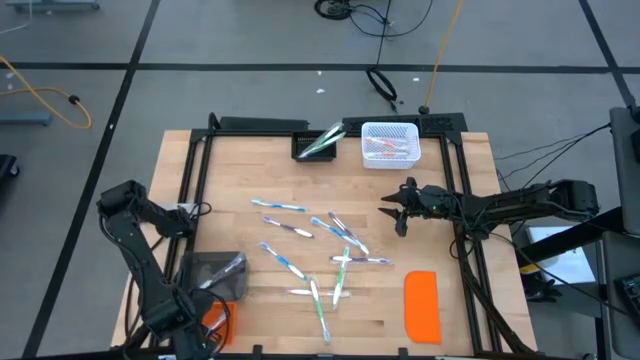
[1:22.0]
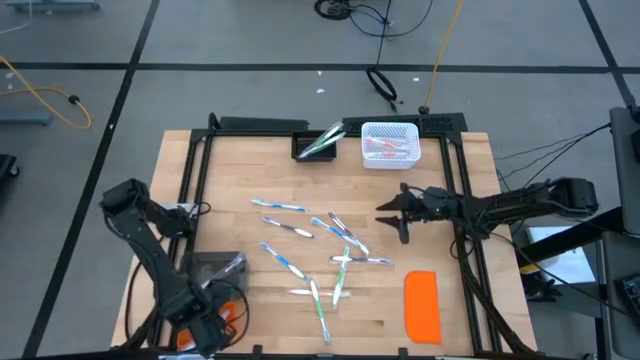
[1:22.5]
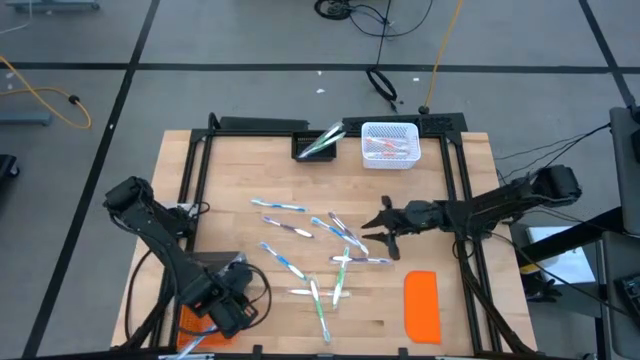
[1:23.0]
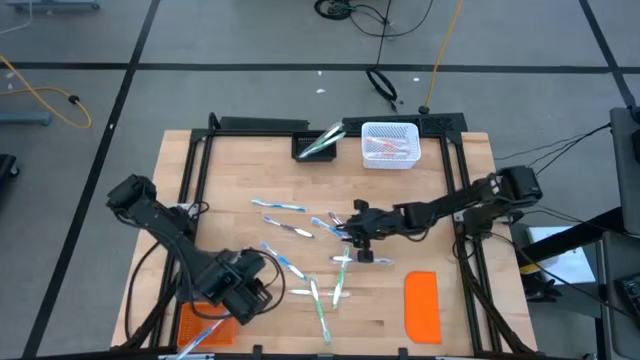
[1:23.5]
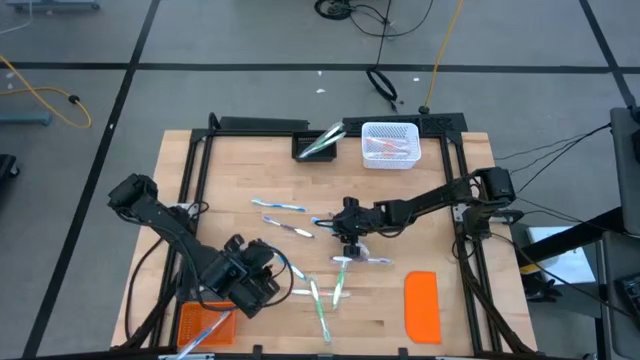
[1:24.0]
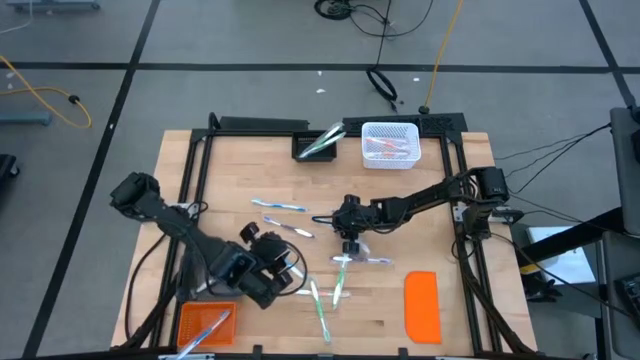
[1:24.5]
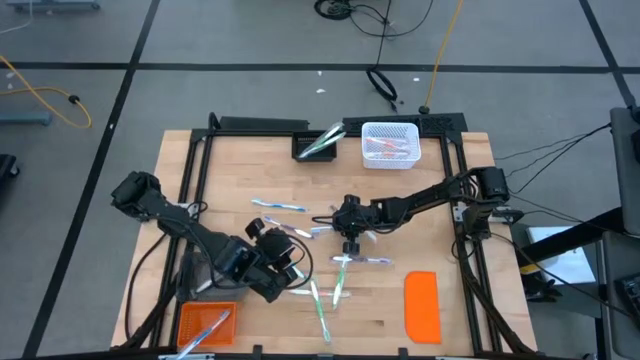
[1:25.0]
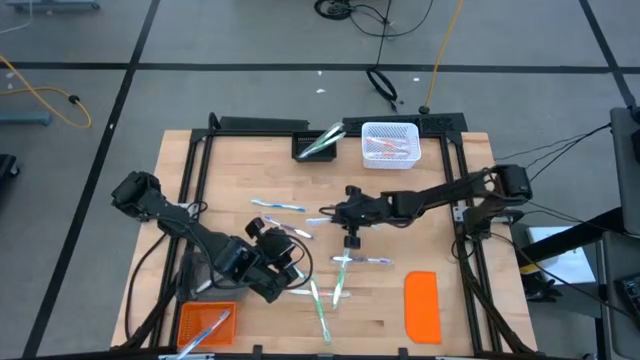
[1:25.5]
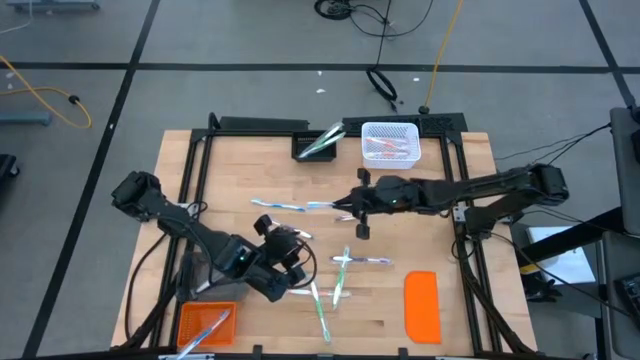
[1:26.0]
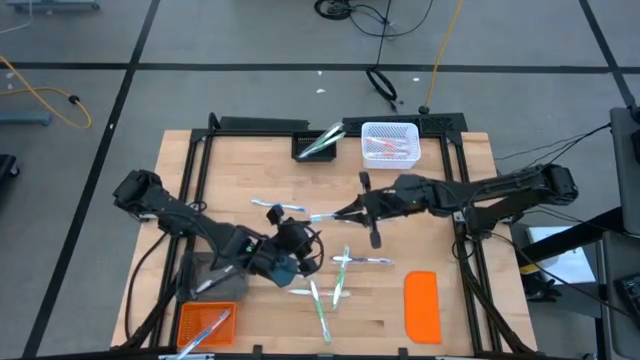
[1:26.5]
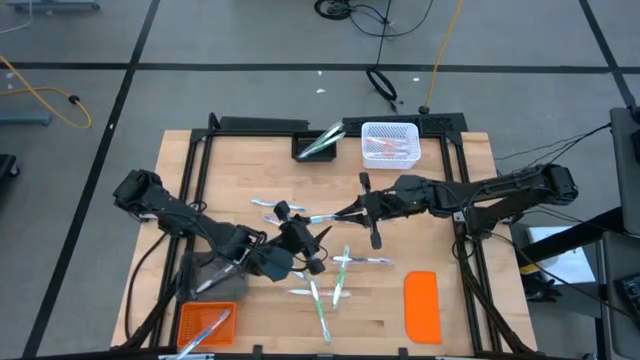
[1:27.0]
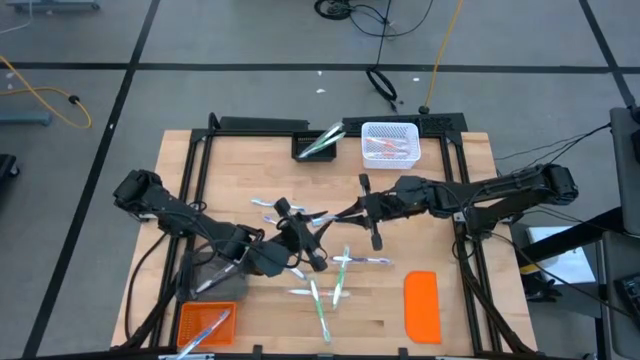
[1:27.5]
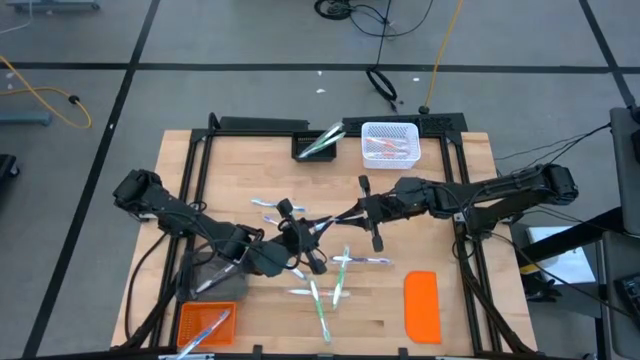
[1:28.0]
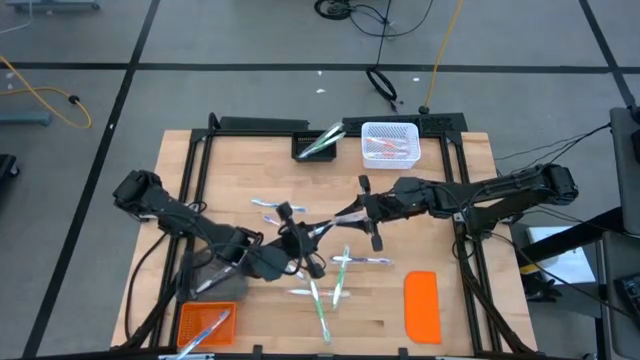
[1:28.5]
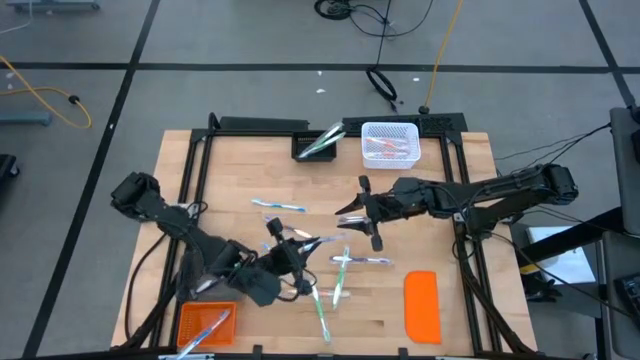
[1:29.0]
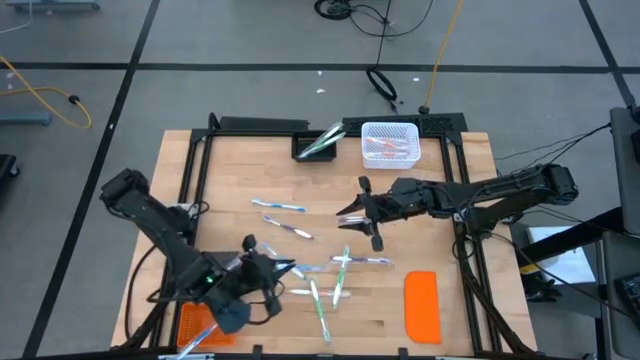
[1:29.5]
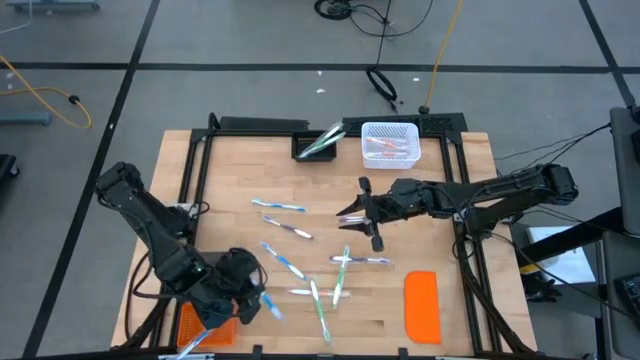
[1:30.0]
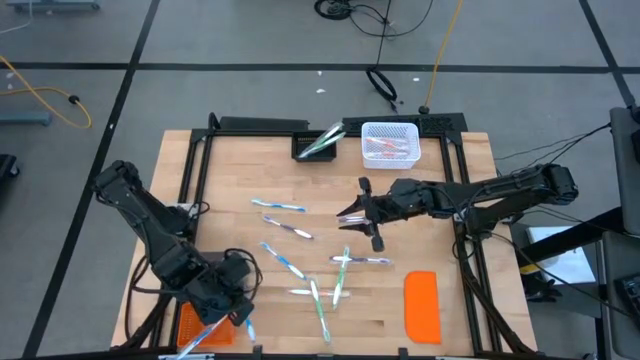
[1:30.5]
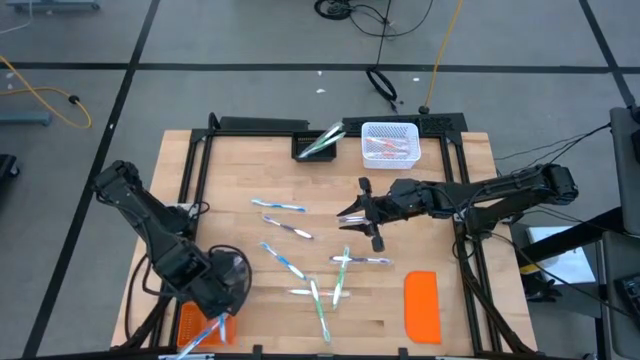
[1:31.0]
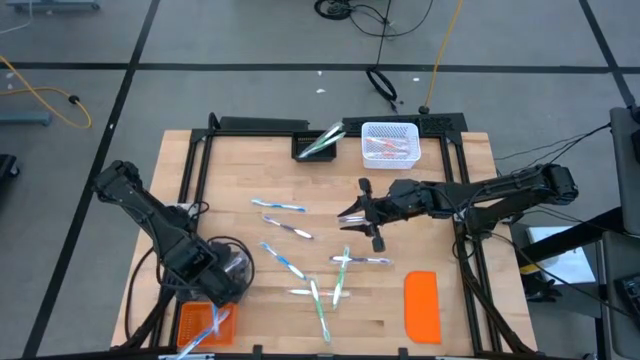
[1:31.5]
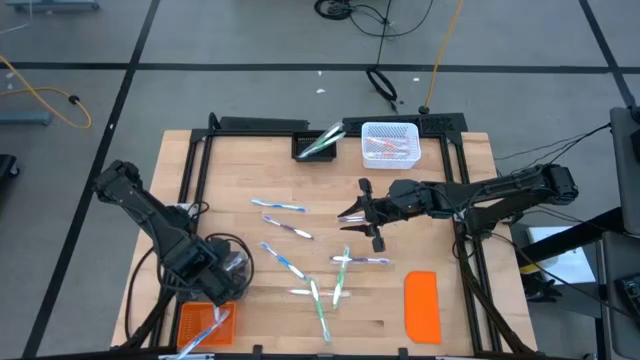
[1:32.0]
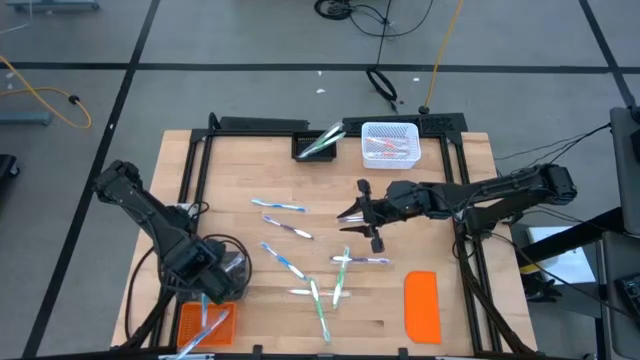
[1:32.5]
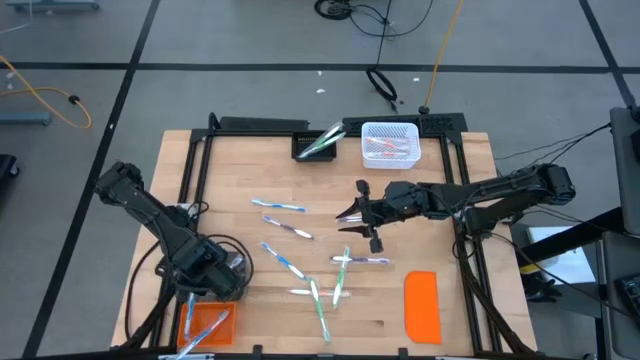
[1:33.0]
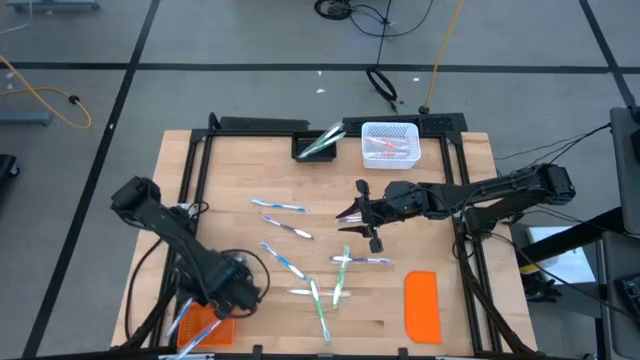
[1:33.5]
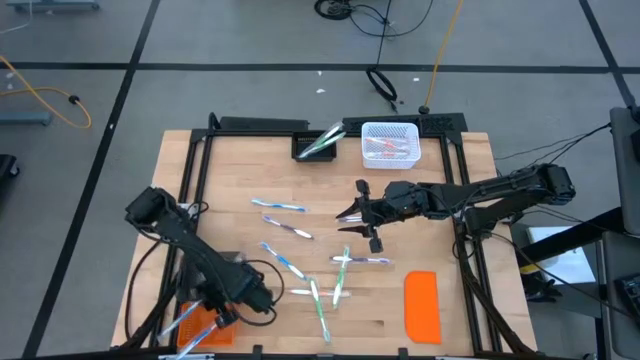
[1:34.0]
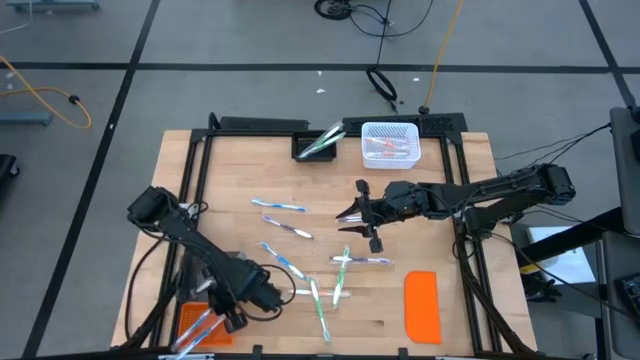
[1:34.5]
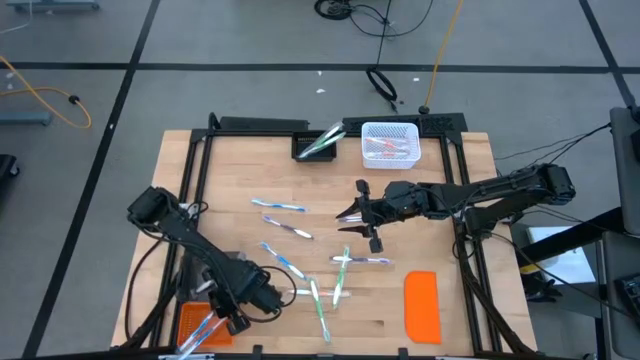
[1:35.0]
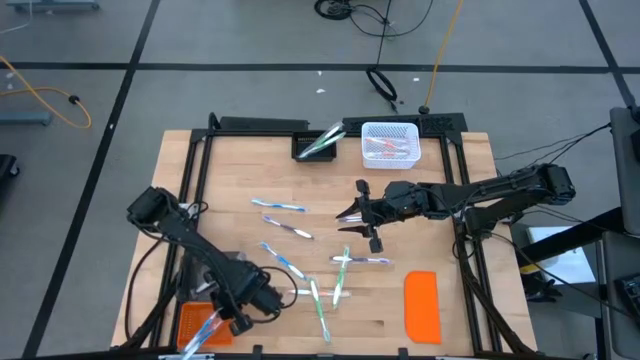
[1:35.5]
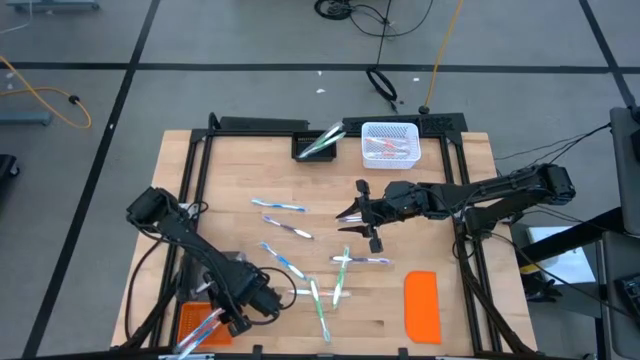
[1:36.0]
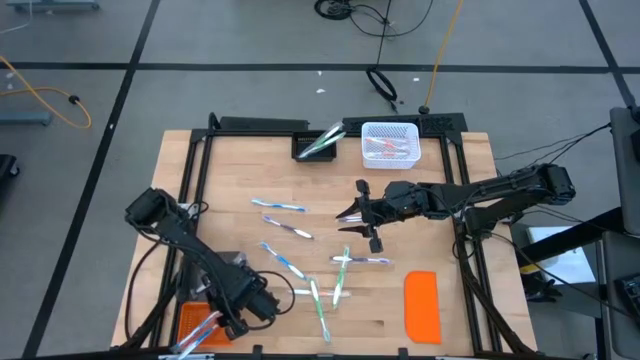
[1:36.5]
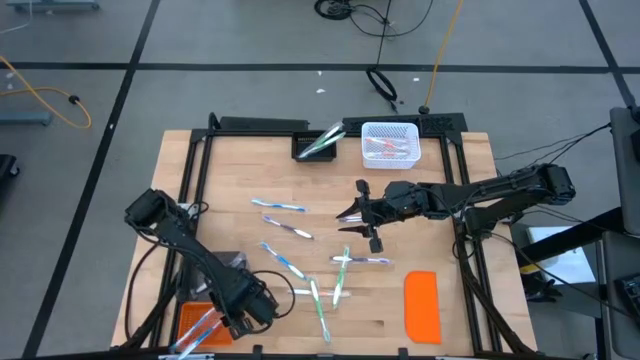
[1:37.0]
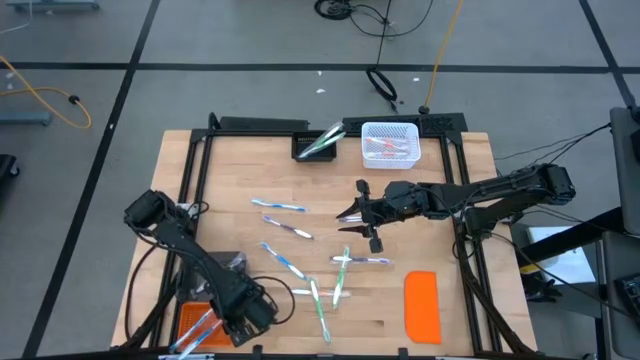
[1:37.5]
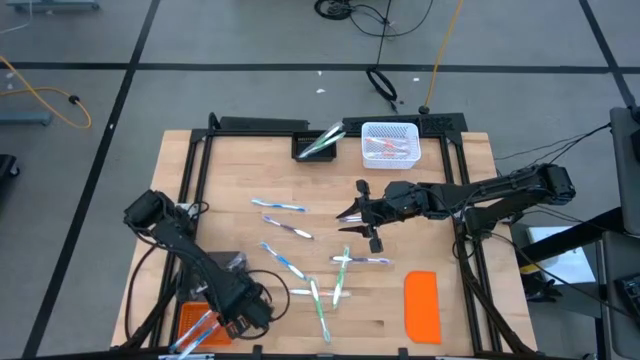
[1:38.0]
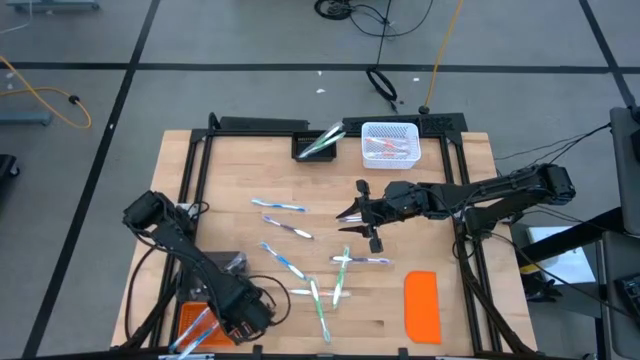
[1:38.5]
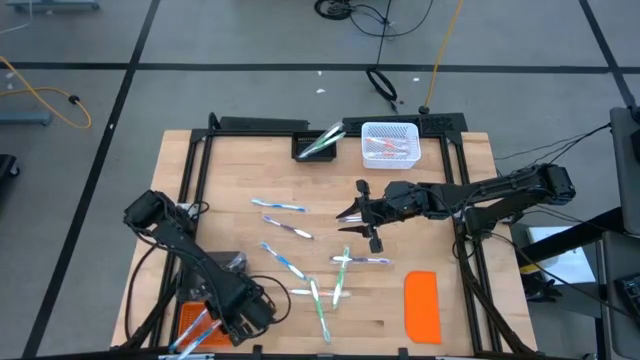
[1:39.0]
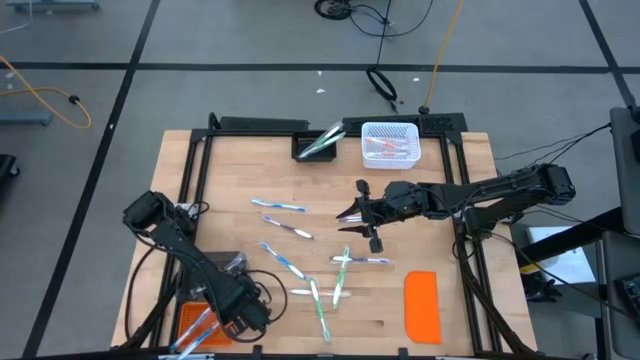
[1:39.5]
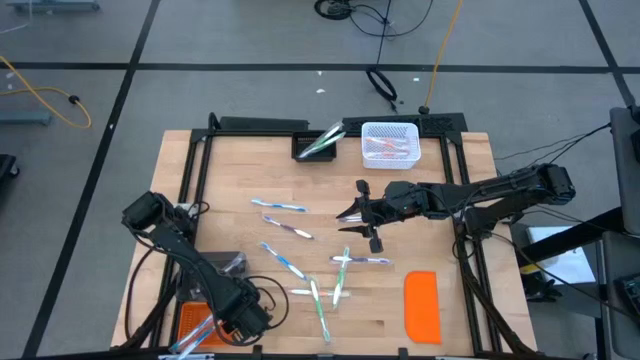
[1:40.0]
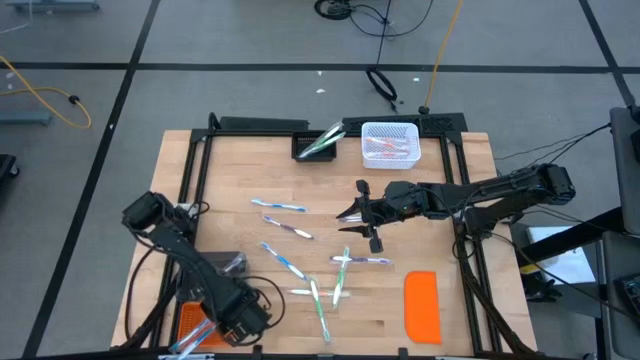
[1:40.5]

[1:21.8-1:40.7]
Task: Pick & Place Toothbrushes
Put the blue toothbrush into the orange bin
